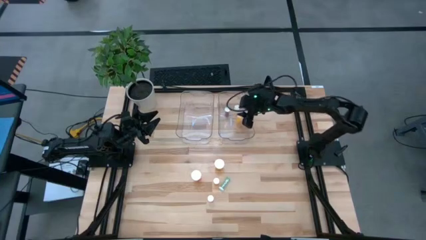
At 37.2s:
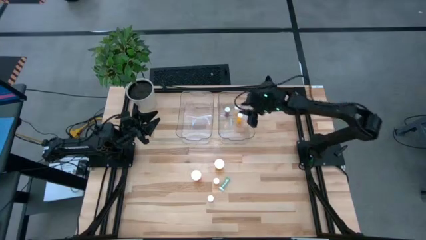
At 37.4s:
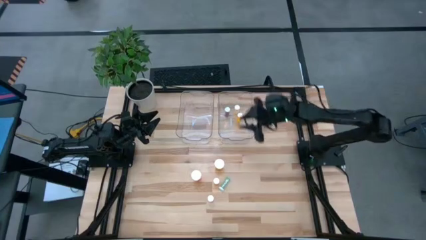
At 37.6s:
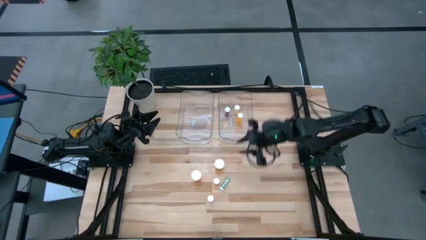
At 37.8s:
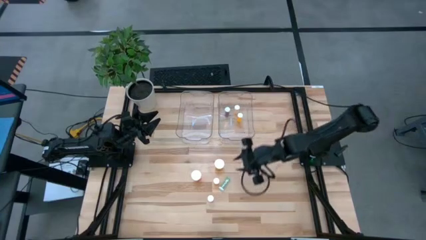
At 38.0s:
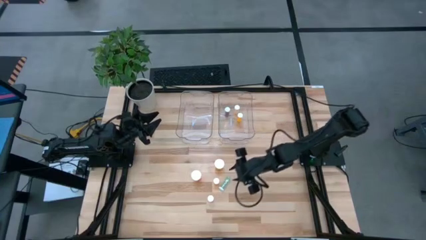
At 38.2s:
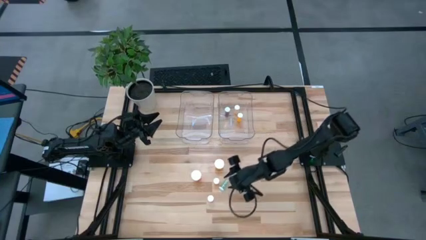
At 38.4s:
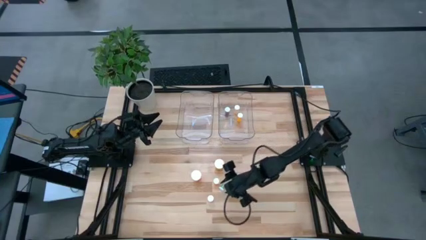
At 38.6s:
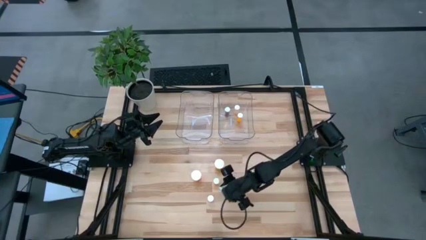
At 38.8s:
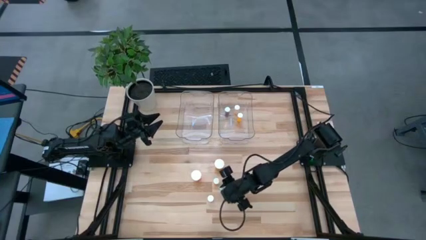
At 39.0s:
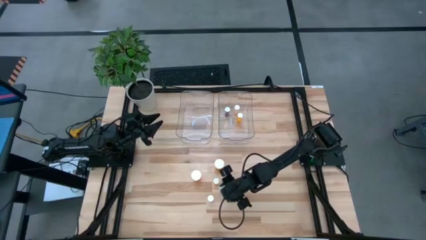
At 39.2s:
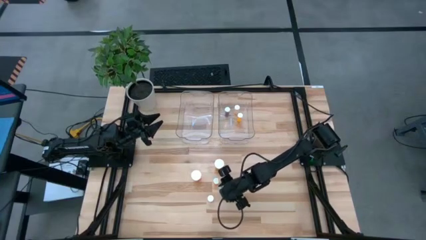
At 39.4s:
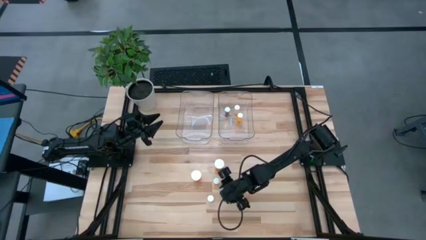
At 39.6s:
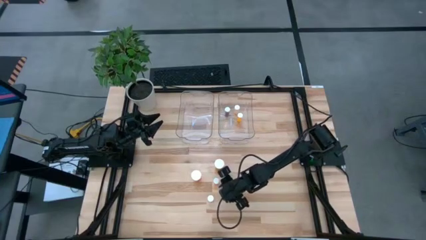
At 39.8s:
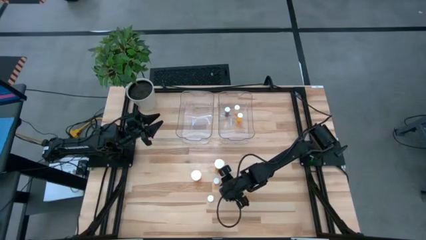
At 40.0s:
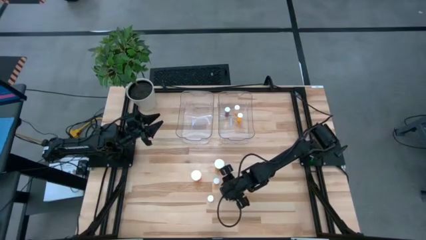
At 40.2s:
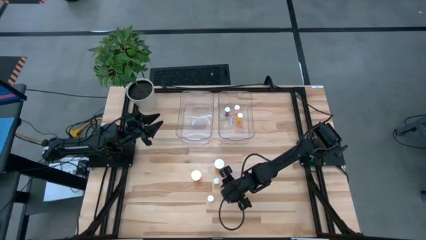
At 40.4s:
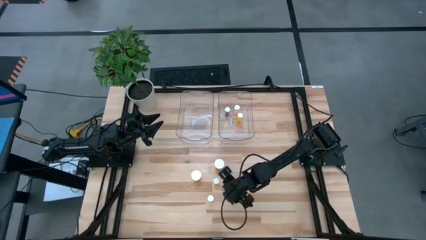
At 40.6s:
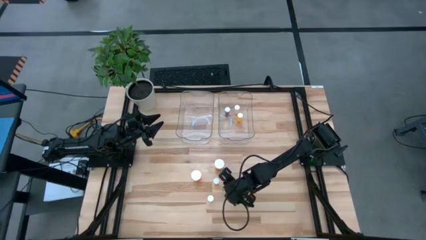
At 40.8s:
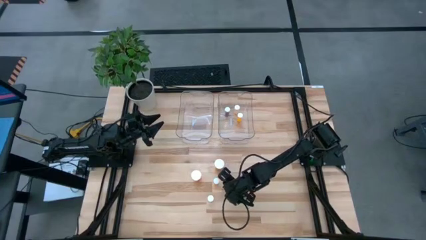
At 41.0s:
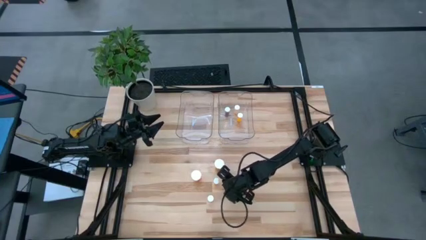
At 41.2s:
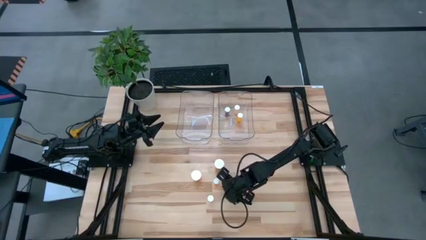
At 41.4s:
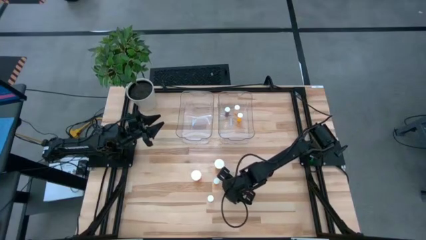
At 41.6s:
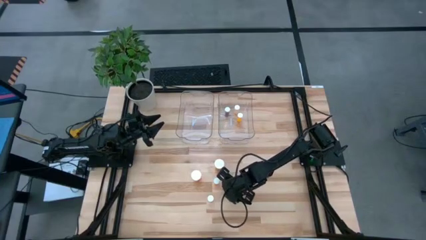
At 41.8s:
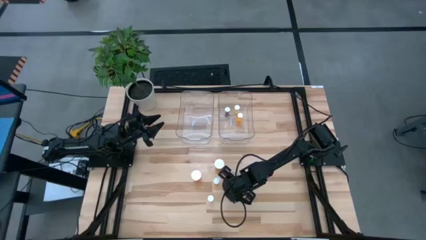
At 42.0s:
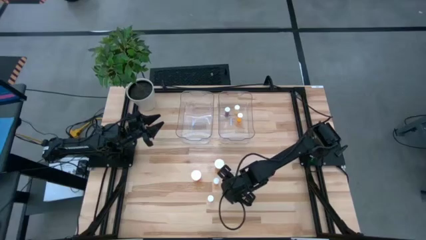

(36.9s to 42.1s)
Task: Pick and place medicine bottles into bin by pill shape (circle, oval)
Put the green tablet bottle into the right transparent bin

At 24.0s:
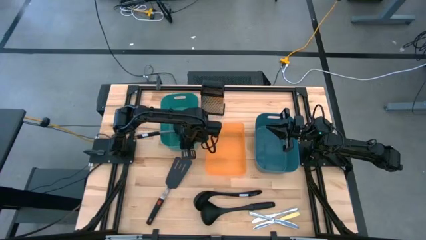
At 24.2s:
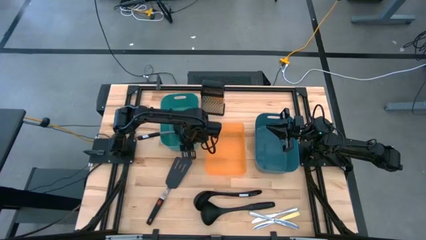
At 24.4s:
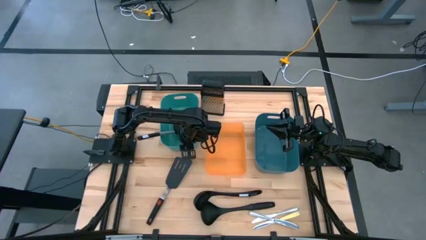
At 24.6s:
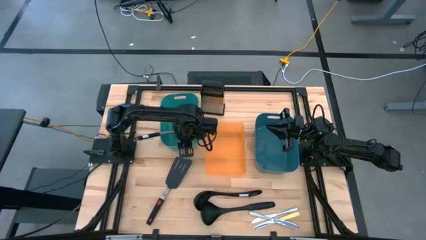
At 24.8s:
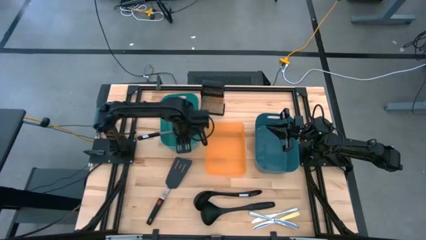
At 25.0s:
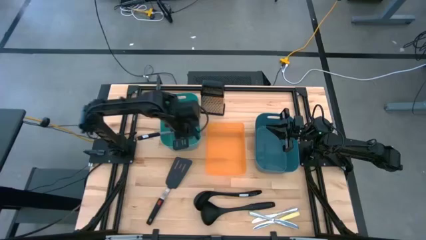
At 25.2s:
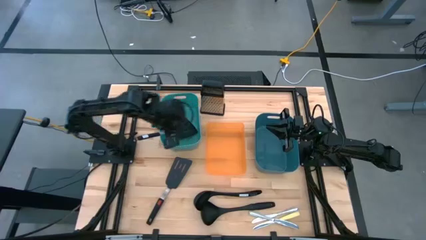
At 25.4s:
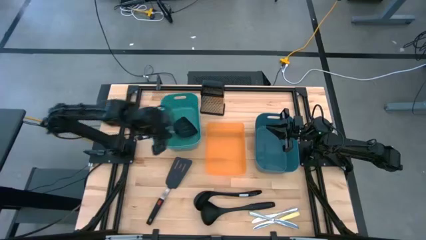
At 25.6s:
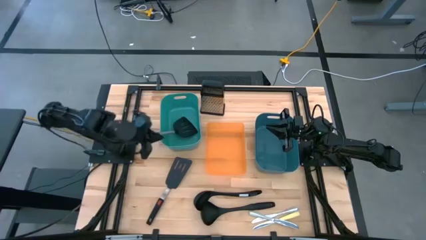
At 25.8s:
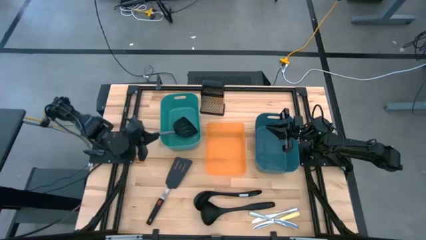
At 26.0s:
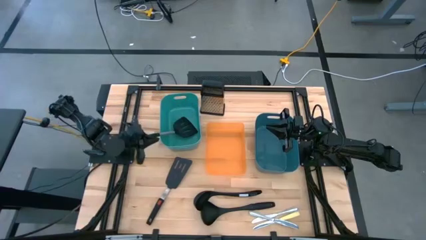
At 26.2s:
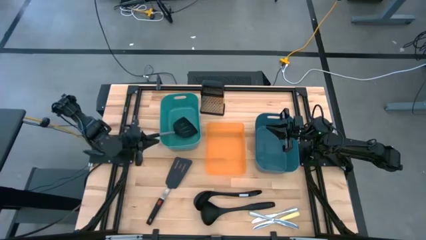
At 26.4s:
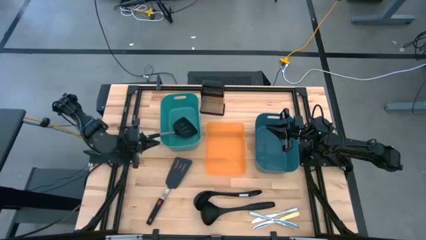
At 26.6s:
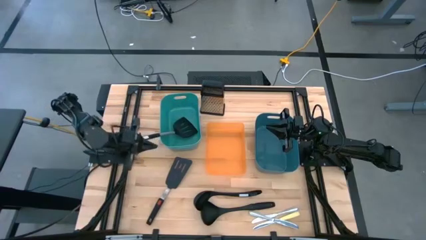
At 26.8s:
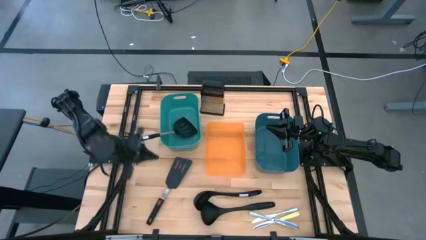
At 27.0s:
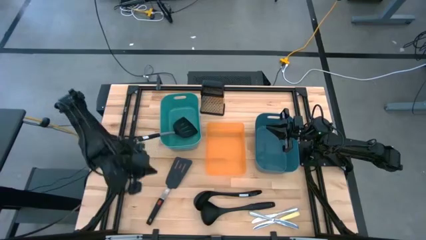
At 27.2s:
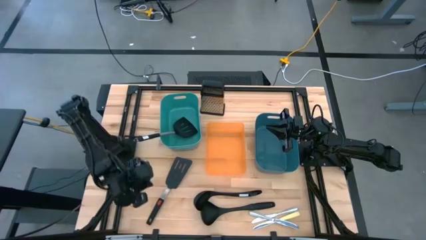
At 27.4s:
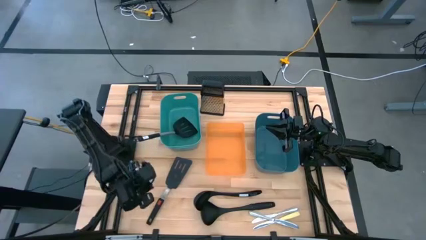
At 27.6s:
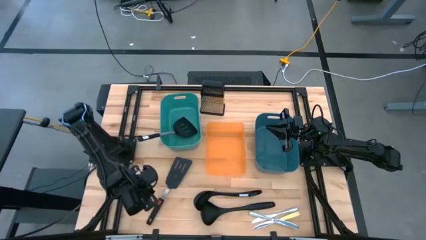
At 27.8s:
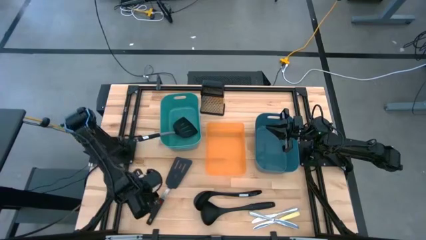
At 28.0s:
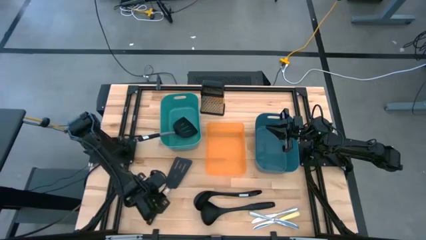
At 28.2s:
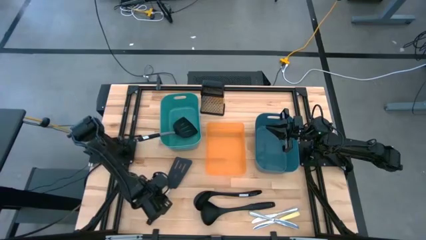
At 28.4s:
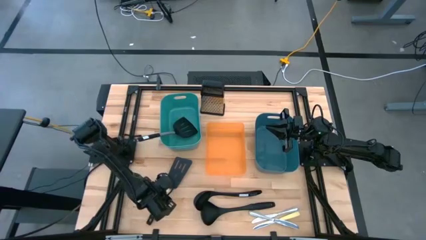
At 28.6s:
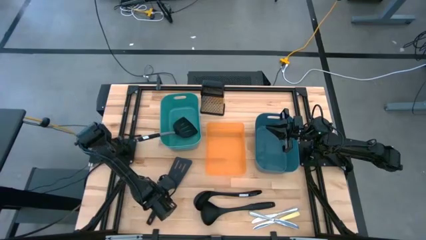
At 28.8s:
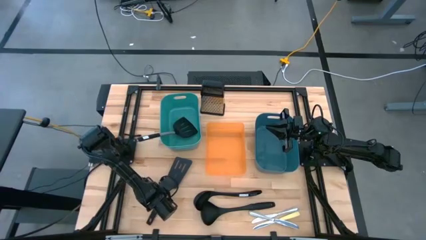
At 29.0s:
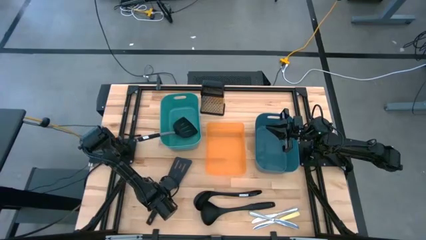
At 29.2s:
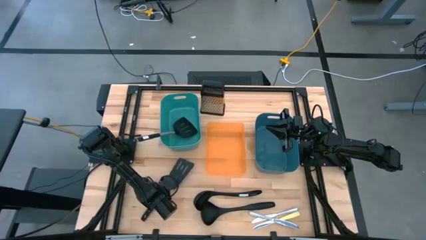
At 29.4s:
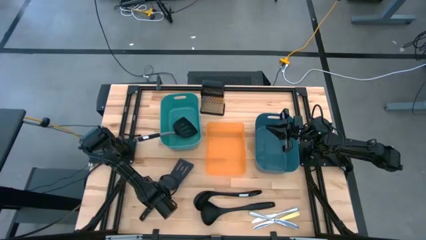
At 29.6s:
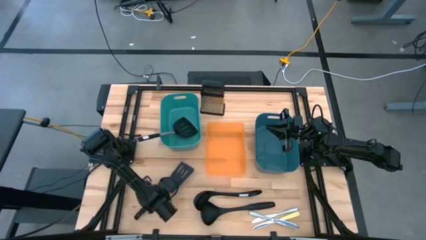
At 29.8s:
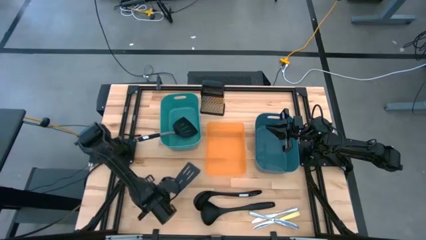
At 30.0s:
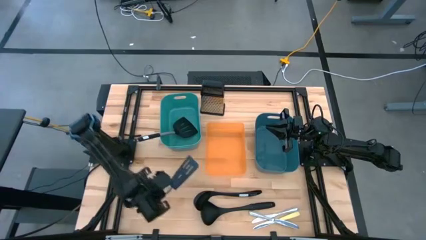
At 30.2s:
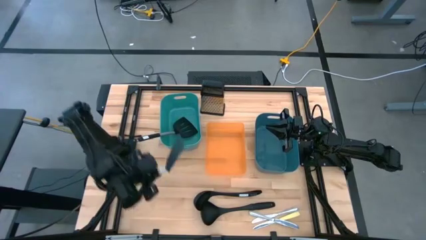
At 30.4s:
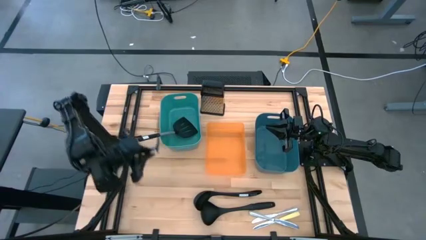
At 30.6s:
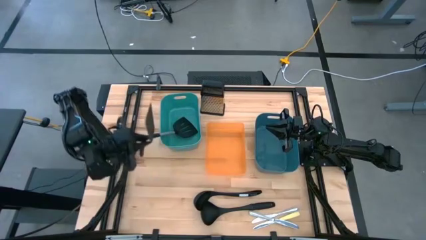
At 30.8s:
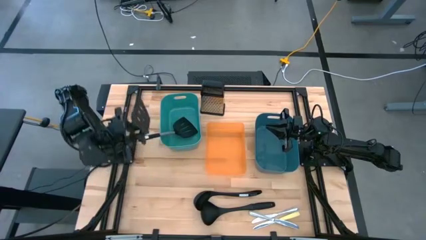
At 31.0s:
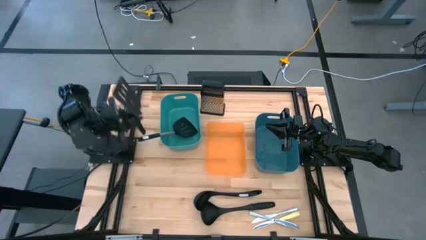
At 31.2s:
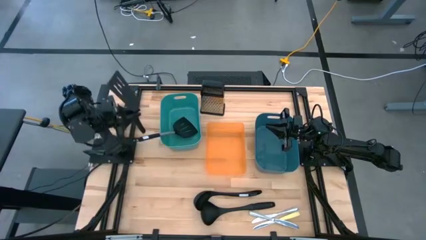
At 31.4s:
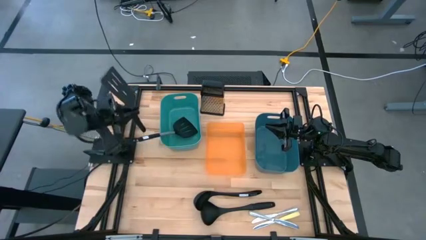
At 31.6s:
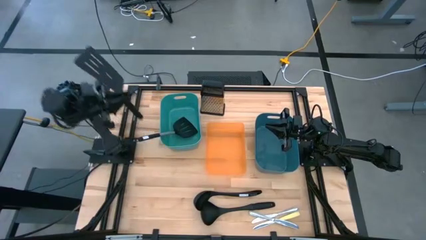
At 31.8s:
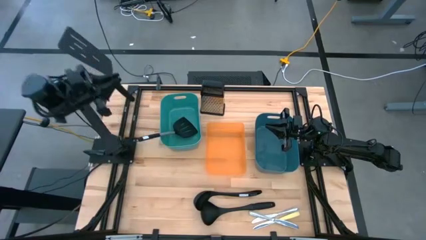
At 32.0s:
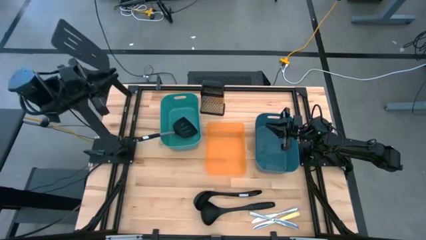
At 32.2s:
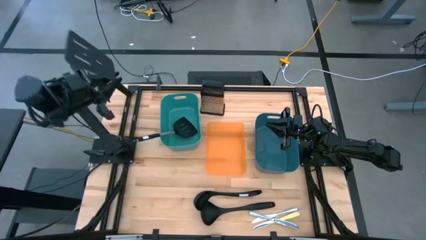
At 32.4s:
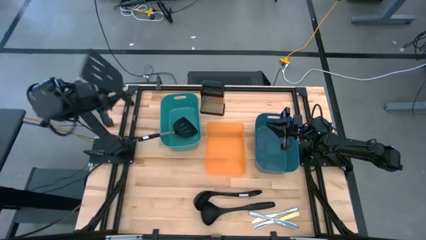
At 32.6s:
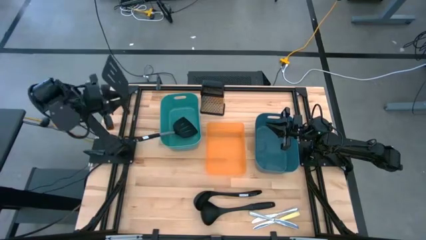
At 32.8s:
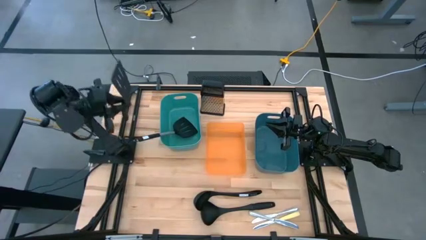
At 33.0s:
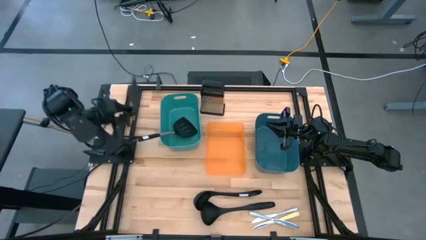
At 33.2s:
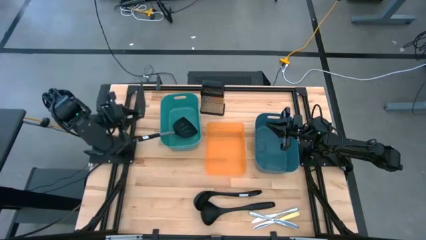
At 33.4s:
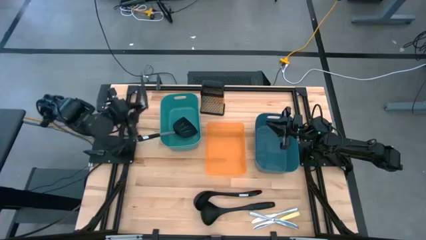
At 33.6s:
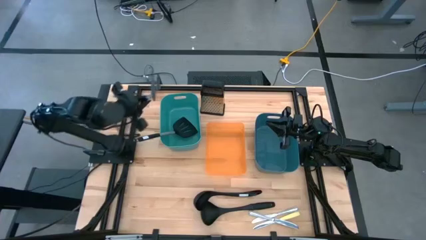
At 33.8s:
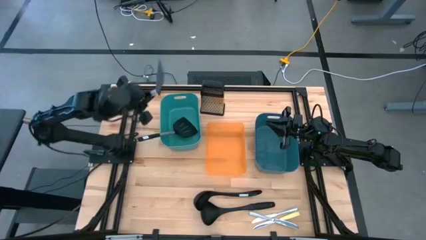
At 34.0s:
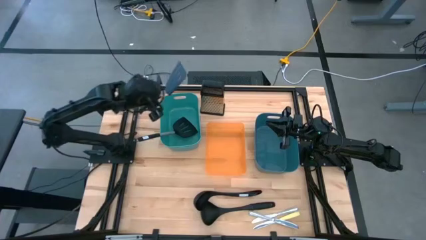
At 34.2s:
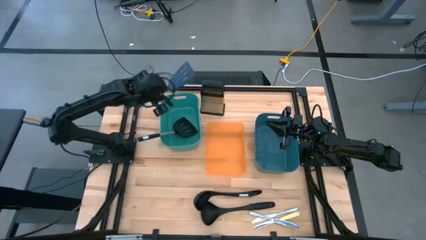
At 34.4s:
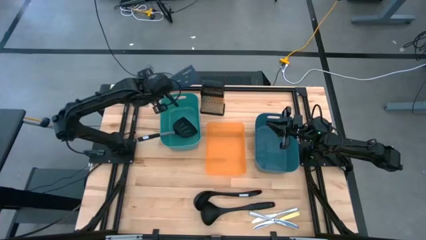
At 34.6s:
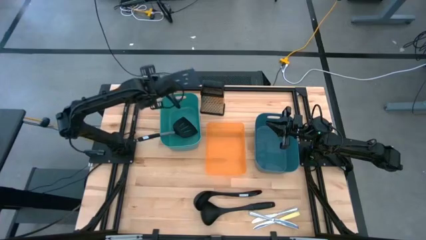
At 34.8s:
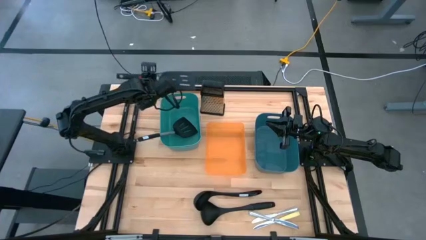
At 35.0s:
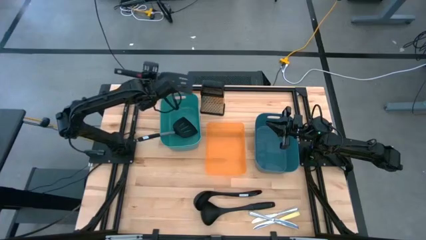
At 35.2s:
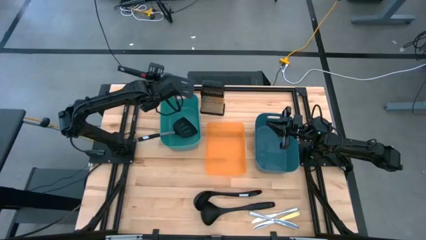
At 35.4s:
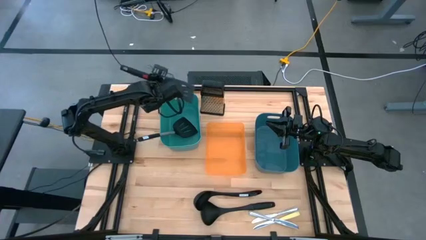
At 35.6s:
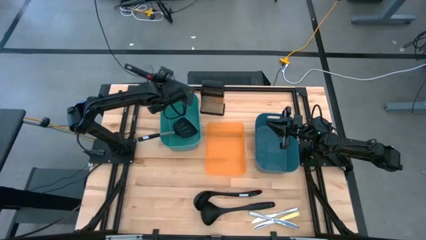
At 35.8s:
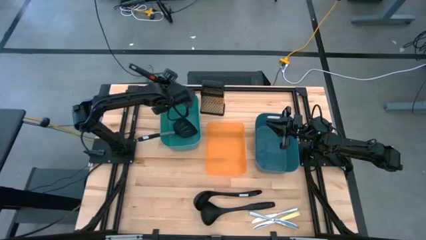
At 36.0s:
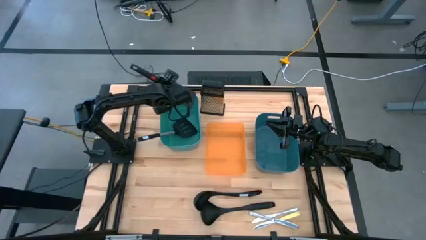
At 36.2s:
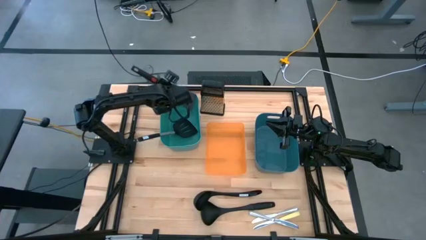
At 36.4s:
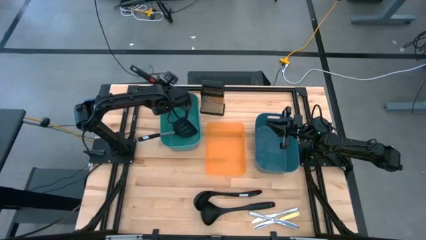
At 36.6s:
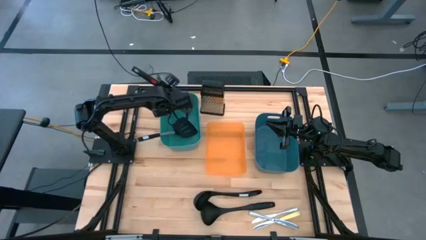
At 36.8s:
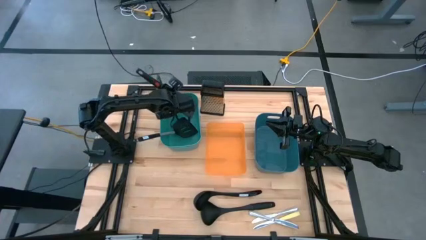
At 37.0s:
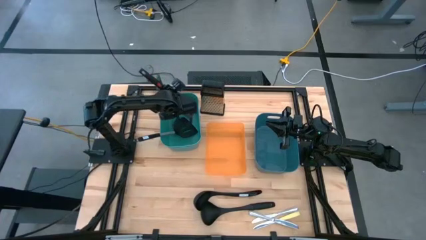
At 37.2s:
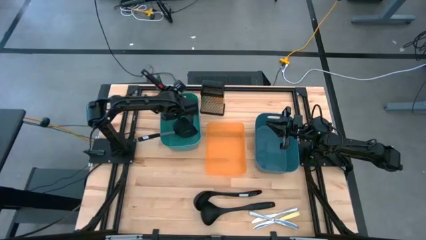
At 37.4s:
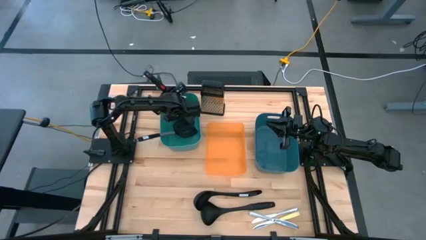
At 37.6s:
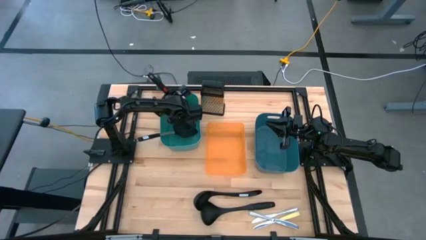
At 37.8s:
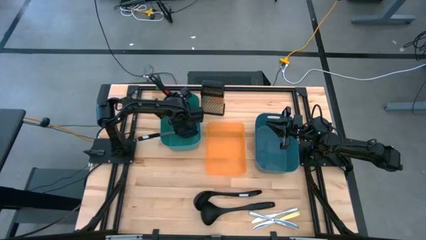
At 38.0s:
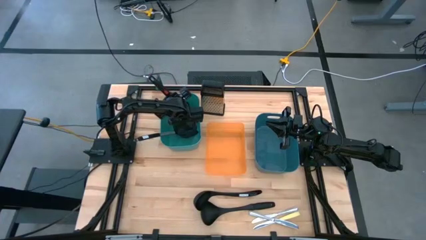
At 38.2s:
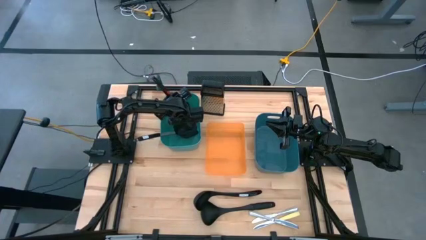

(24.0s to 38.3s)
Task: Pick & Place Kitchen Items
Put the blue spatula into the green bin
